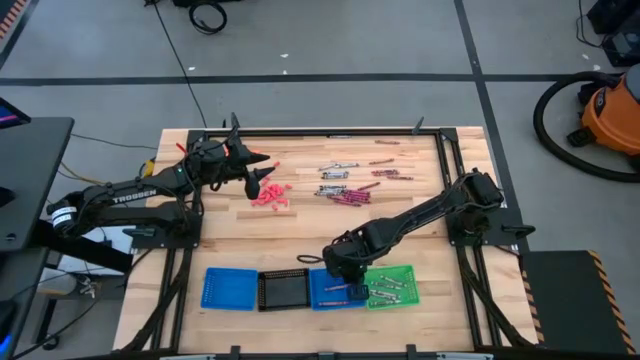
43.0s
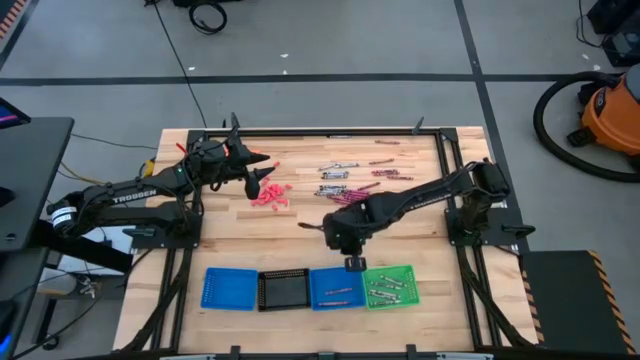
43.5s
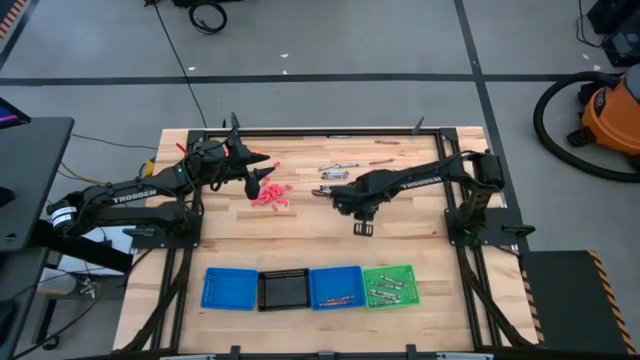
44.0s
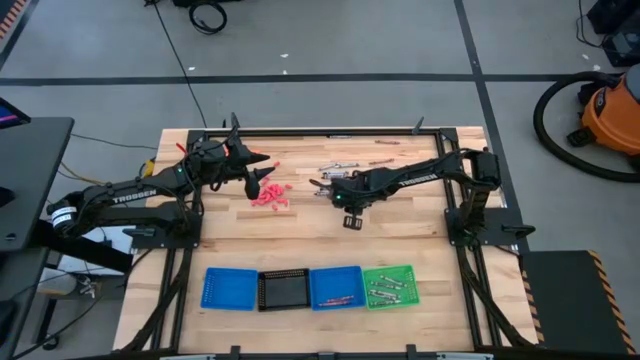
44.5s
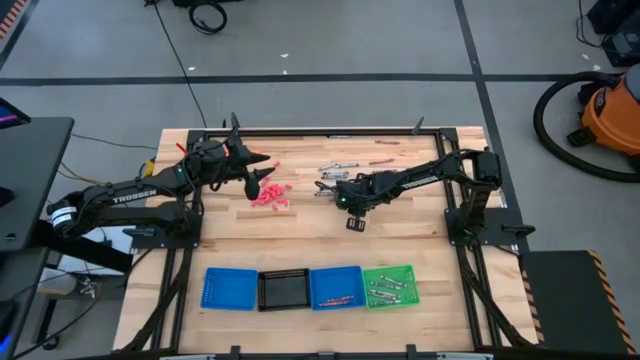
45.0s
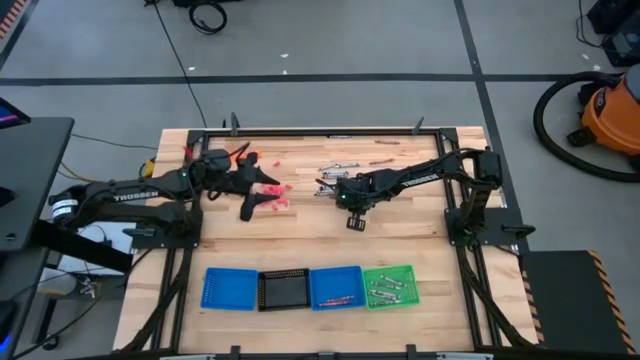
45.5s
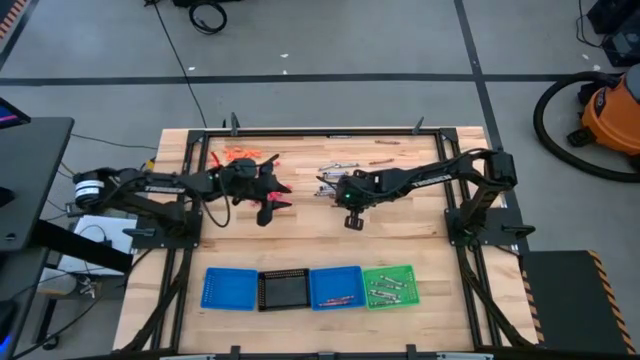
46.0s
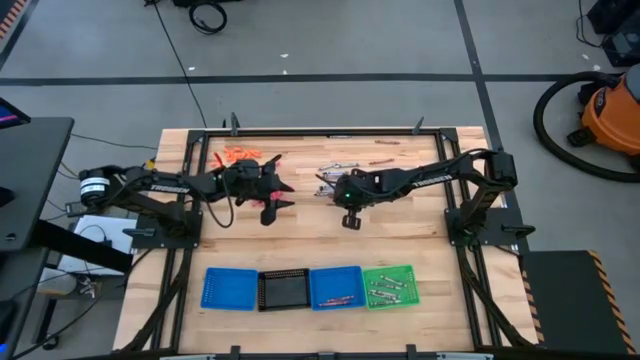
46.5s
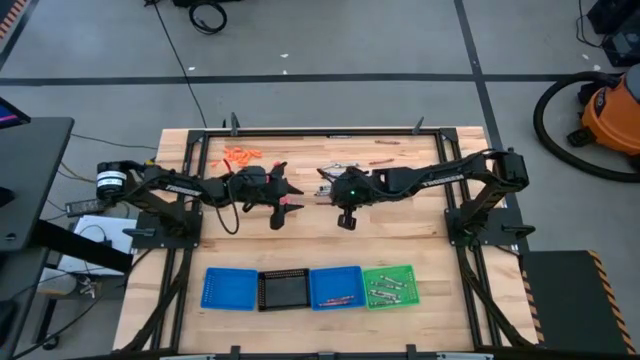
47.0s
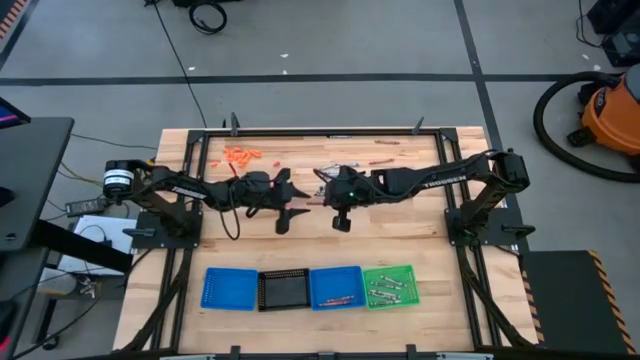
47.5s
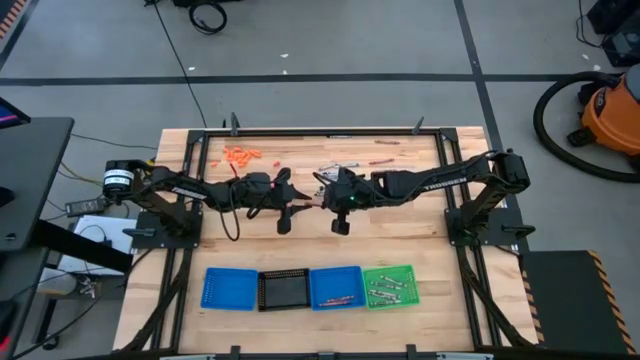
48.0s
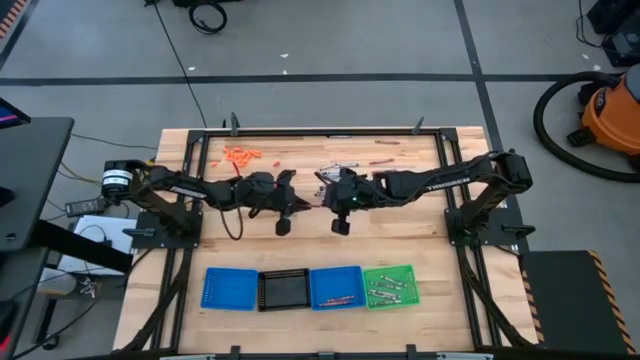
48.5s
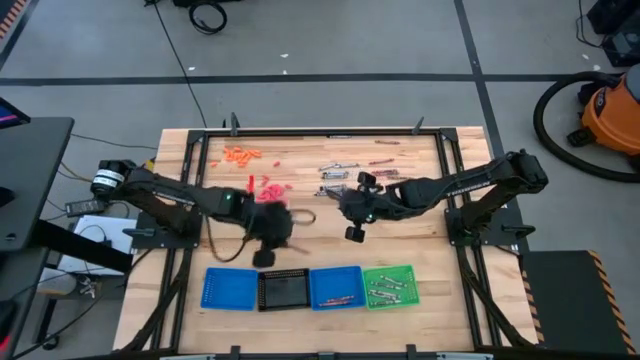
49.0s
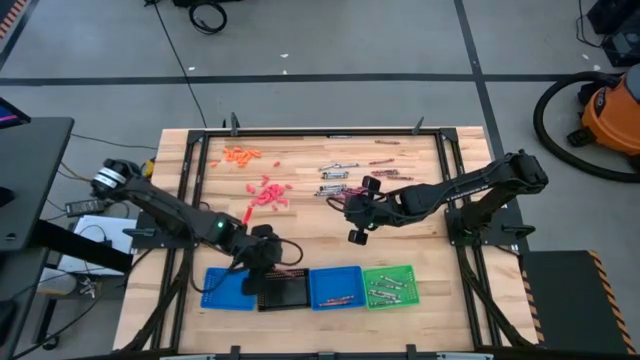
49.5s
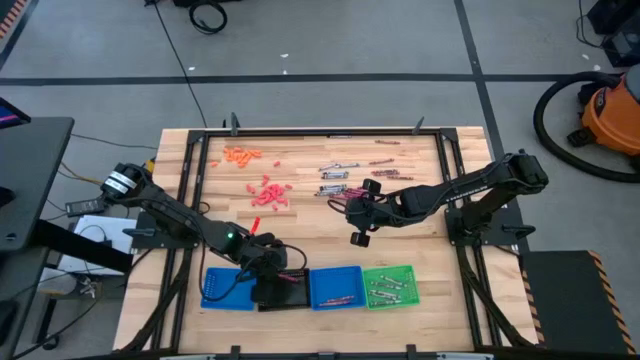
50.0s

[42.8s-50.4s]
Task: Sort crayons
Put the dark pink crayon into the black bin

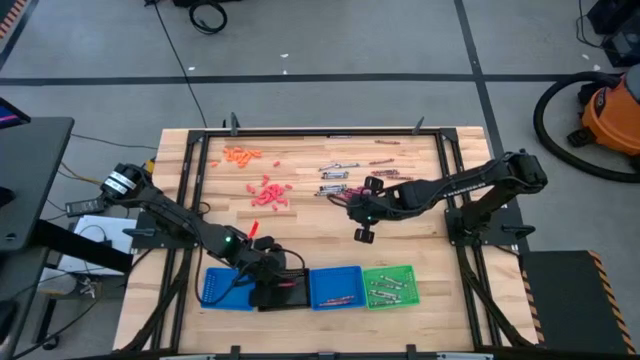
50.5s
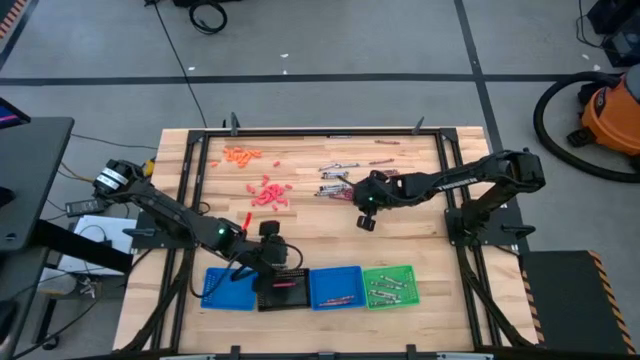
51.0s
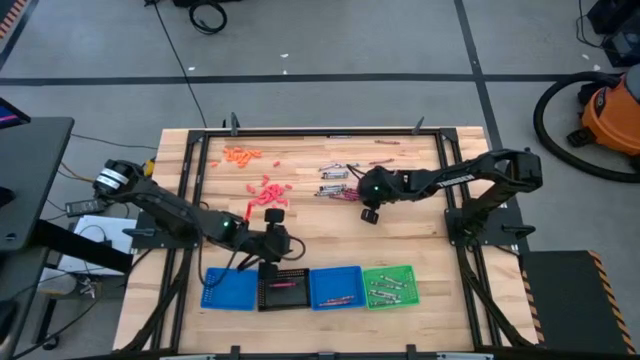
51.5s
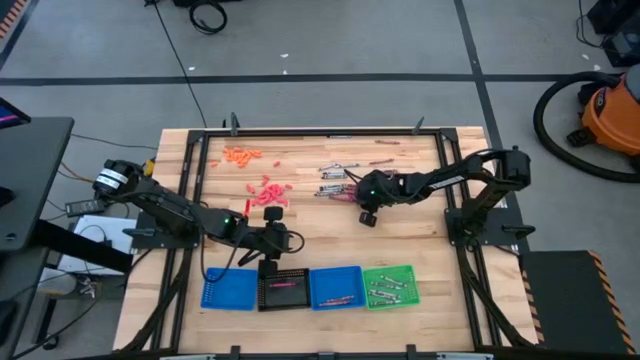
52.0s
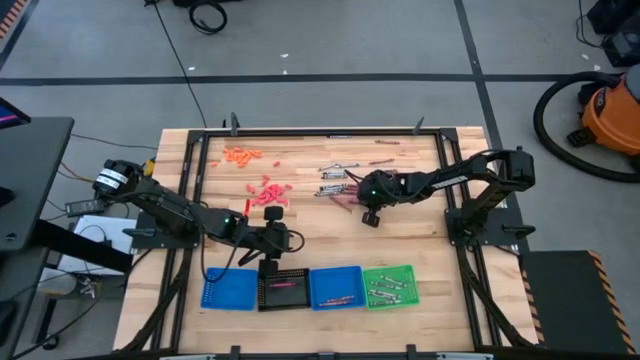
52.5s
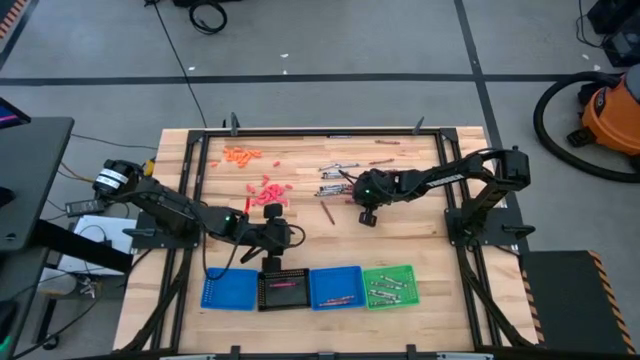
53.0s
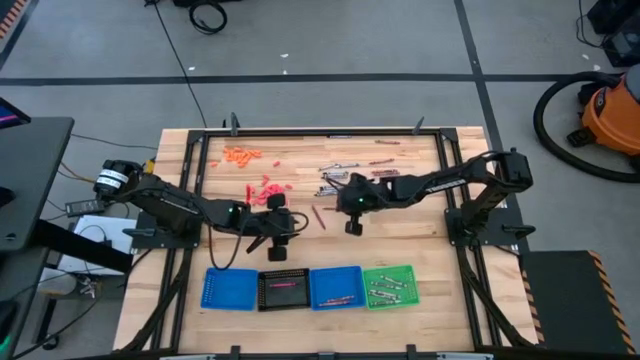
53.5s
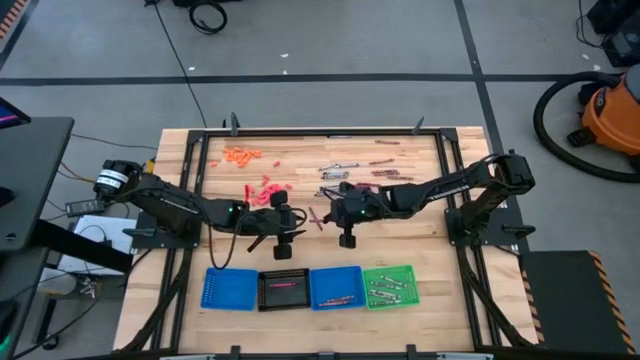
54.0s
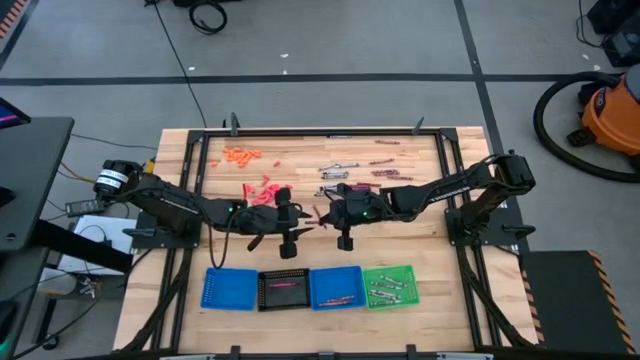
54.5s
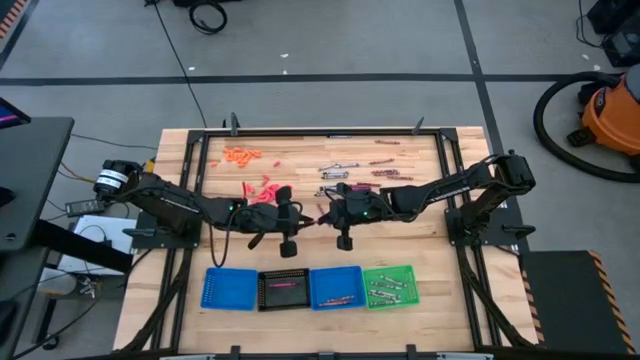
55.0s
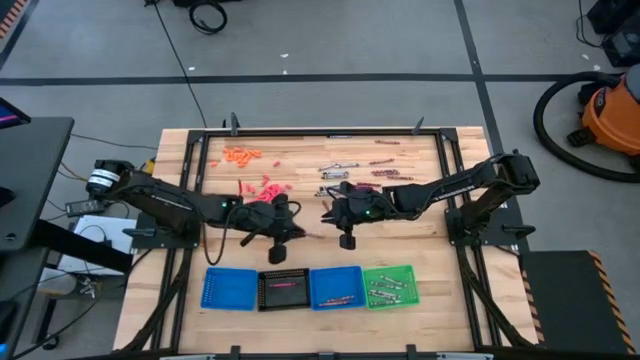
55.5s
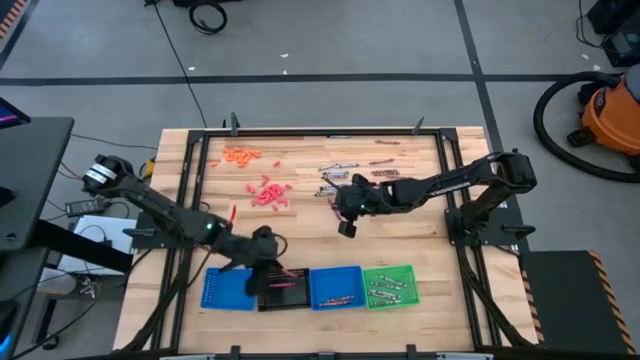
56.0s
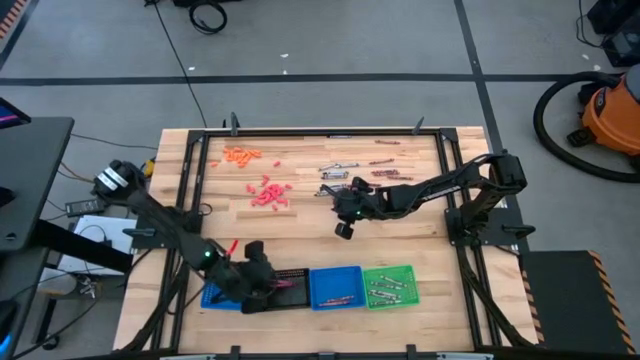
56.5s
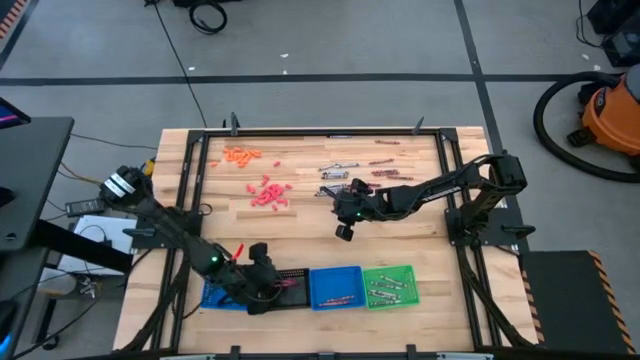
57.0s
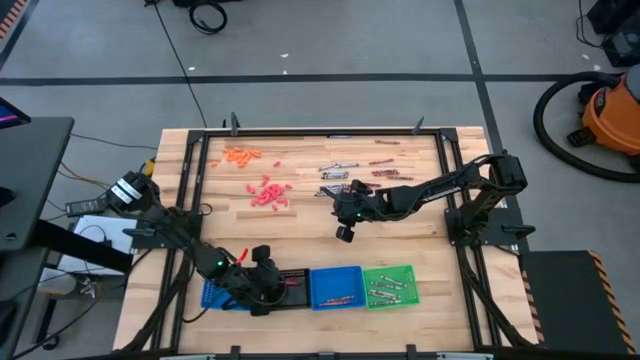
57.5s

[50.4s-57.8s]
Put the dark pink crayon into the black bin

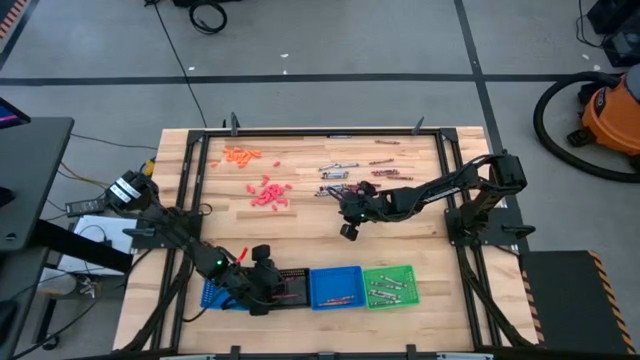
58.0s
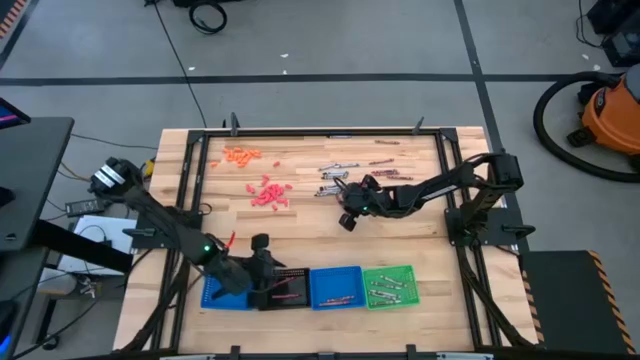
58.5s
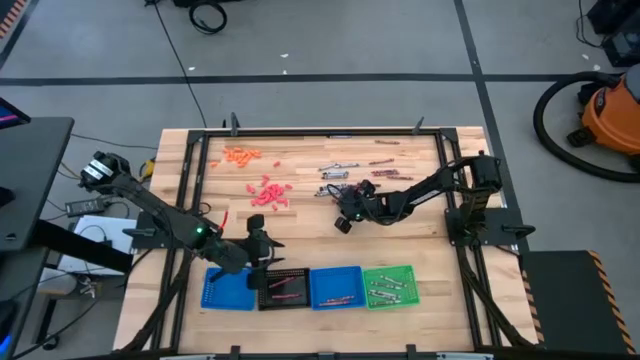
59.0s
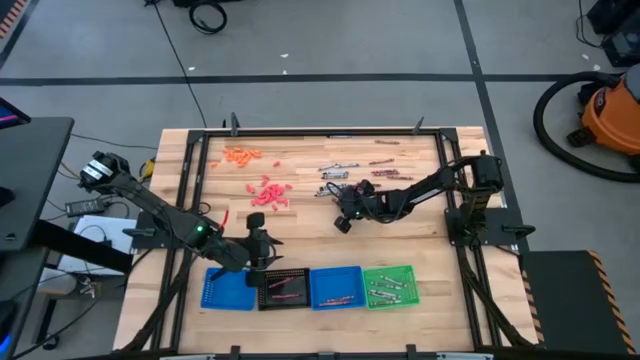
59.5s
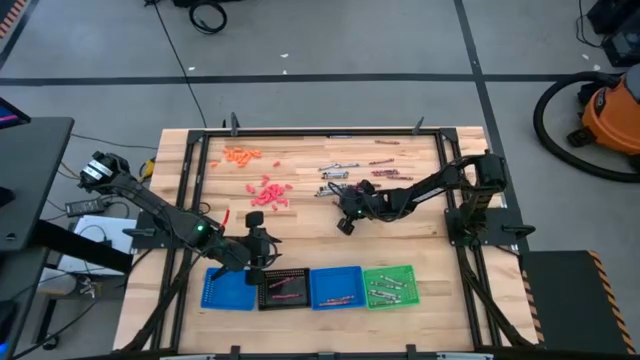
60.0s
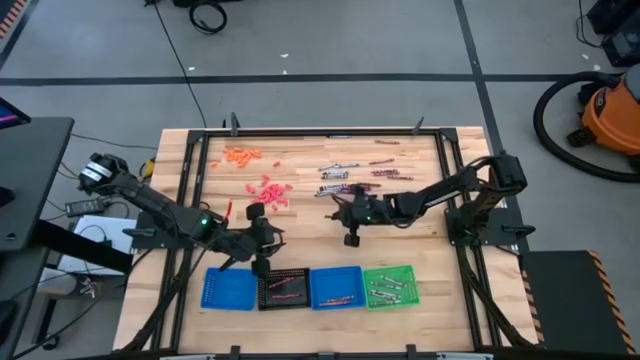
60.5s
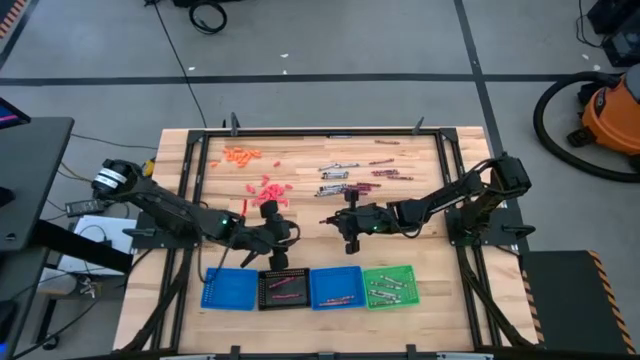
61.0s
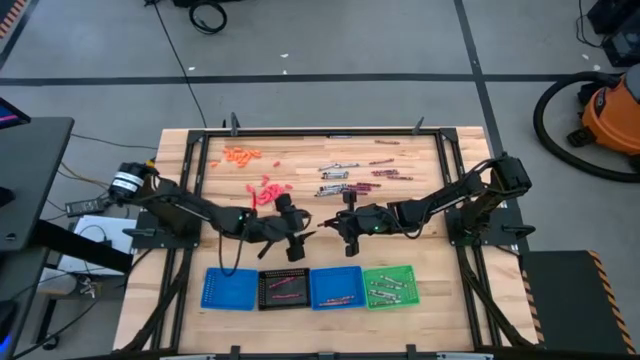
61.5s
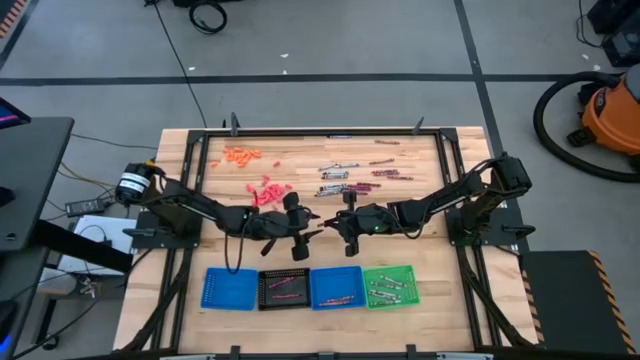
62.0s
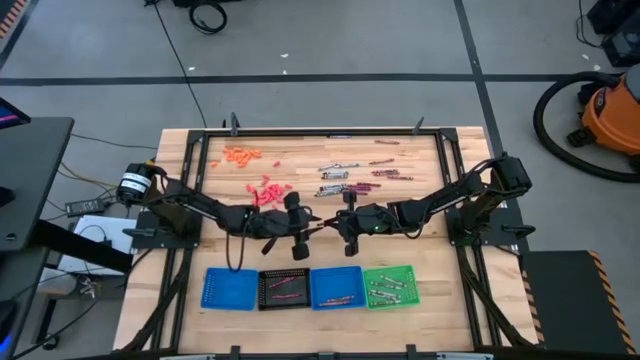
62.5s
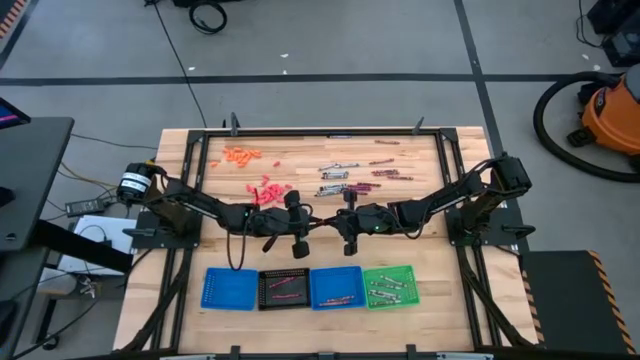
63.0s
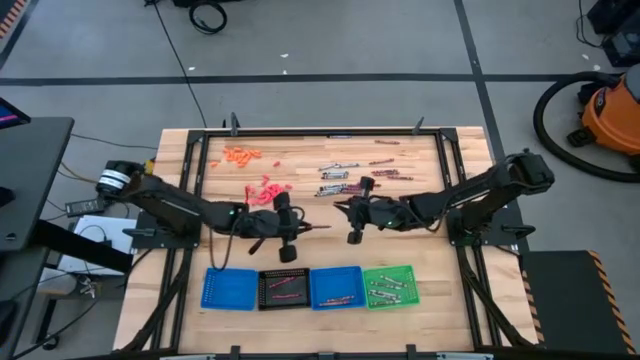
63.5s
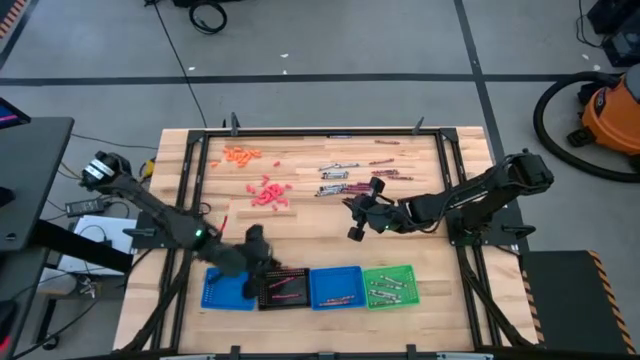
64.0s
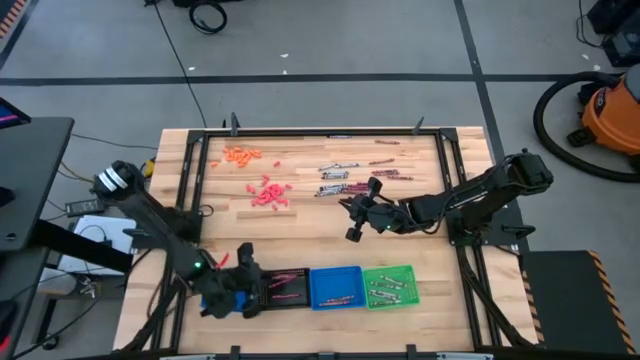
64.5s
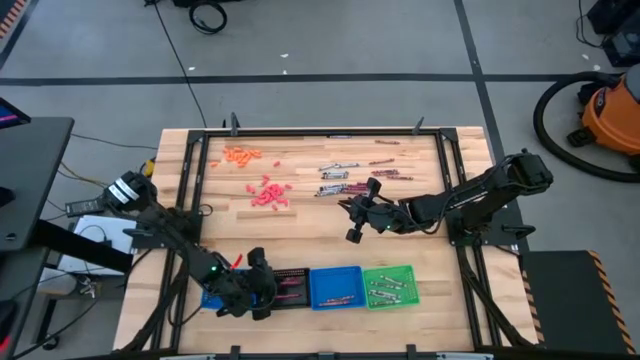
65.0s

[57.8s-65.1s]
Put the dark pink crayon into the black bin
